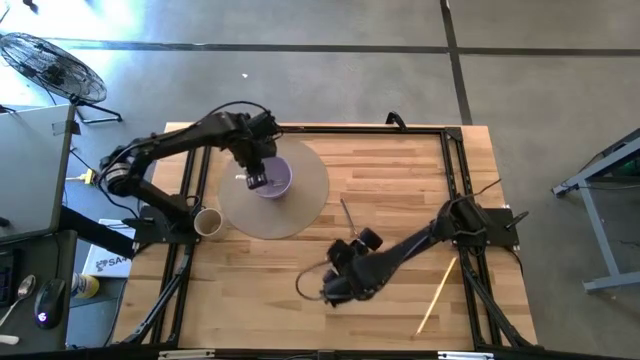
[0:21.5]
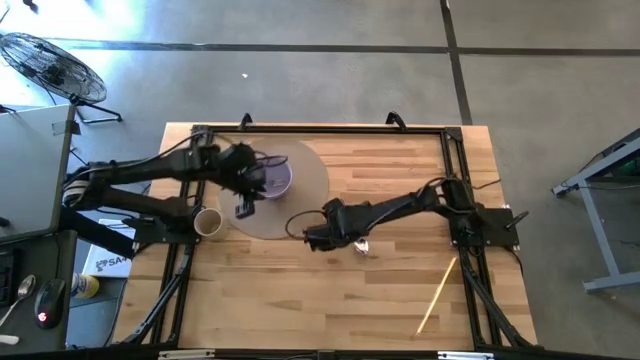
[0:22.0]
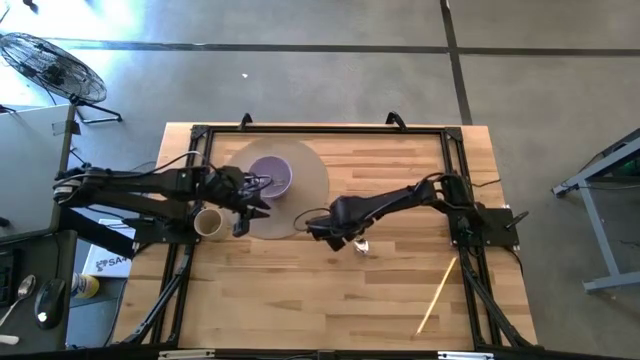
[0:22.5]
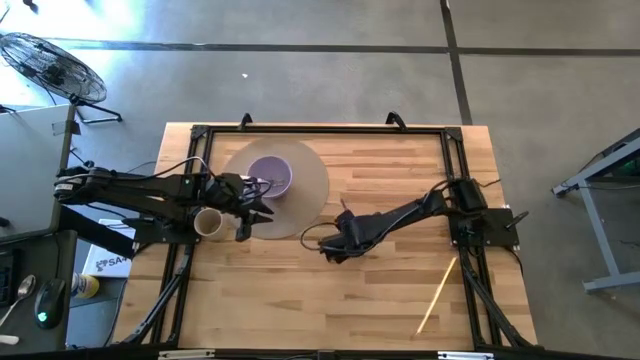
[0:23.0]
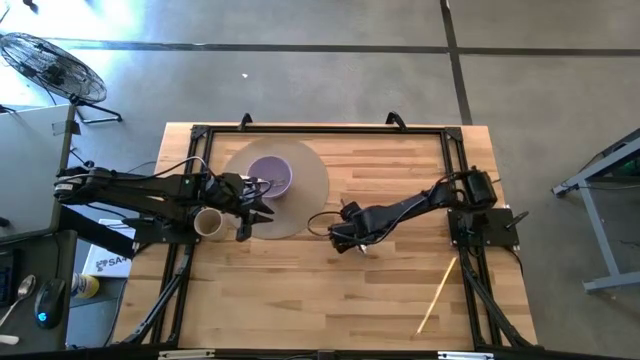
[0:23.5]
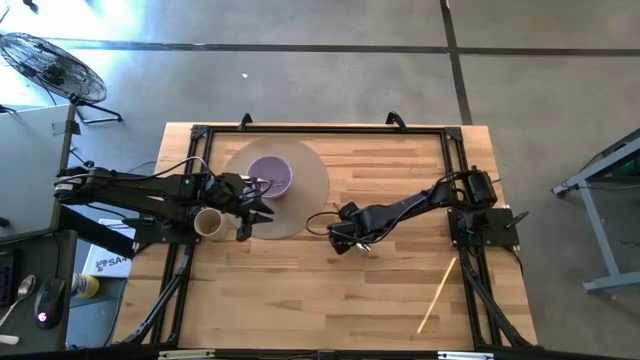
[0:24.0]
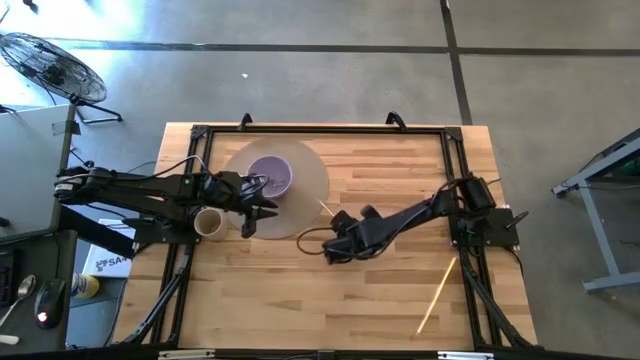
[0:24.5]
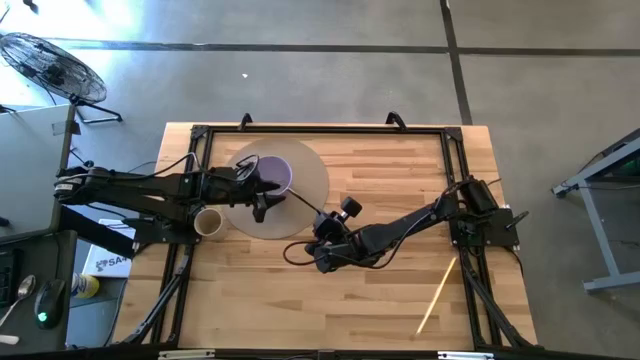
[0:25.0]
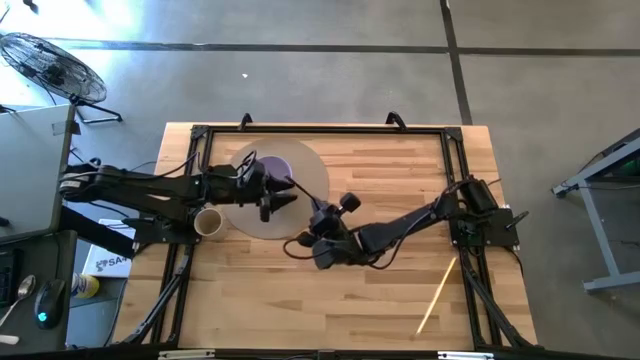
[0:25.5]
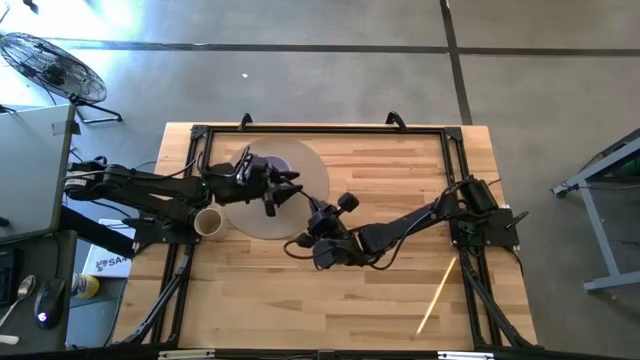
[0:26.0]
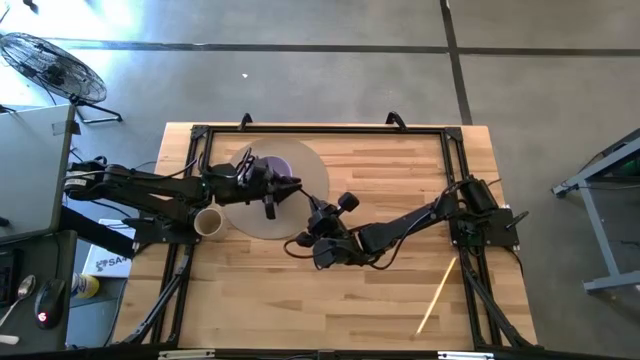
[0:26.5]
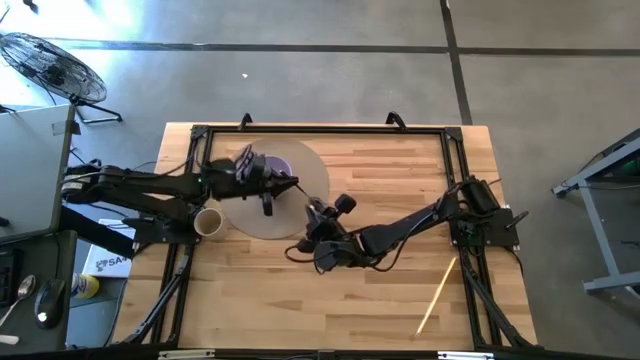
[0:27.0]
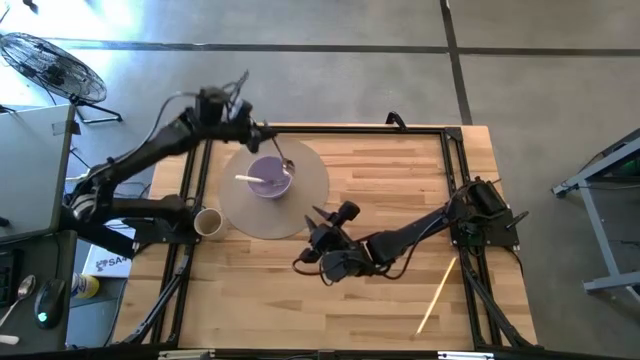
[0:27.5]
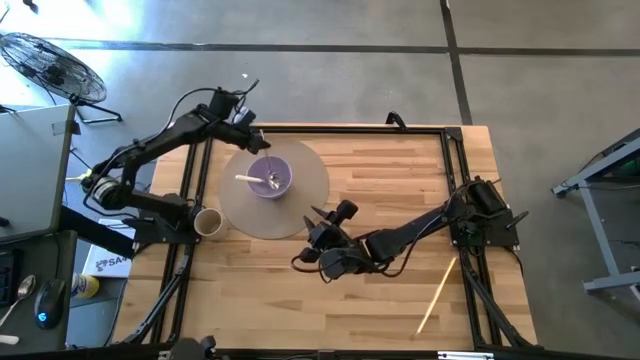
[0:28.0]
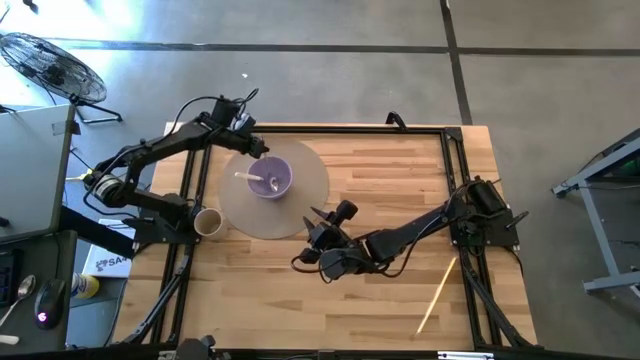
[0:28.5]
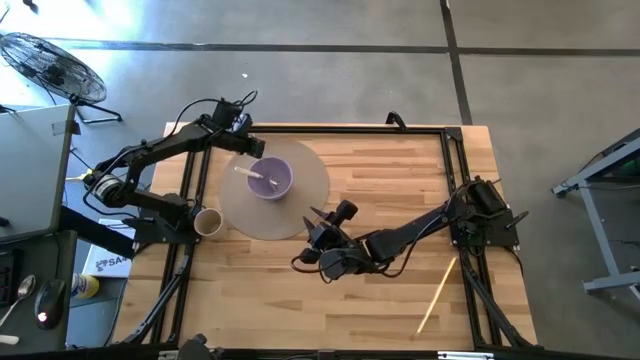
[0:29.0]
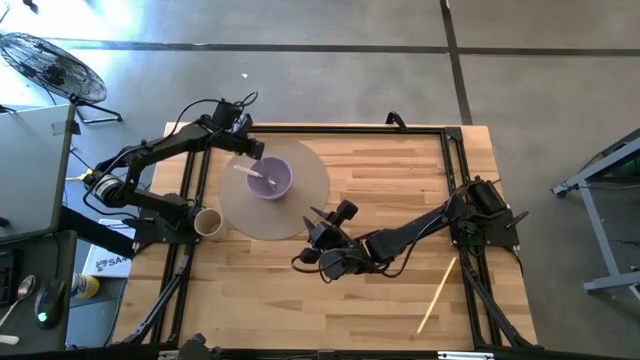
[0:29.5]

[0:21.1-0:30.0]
Task: Pick & Place Utensil
Put the silver spoon into the purple bowl on the gray placemat

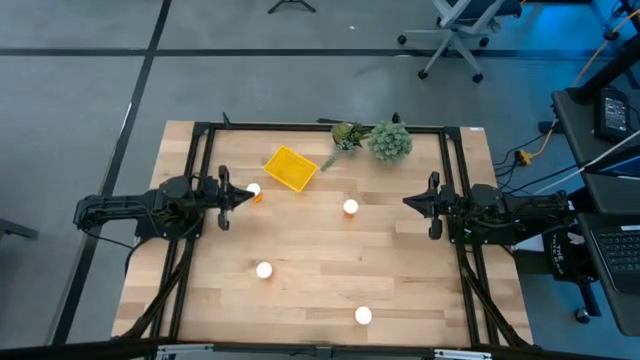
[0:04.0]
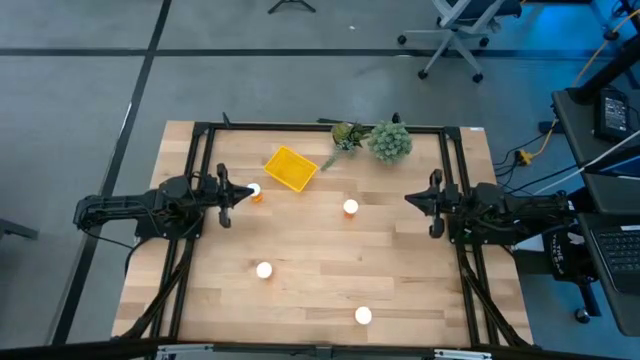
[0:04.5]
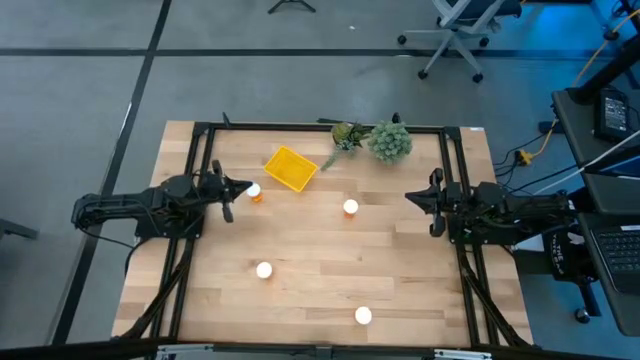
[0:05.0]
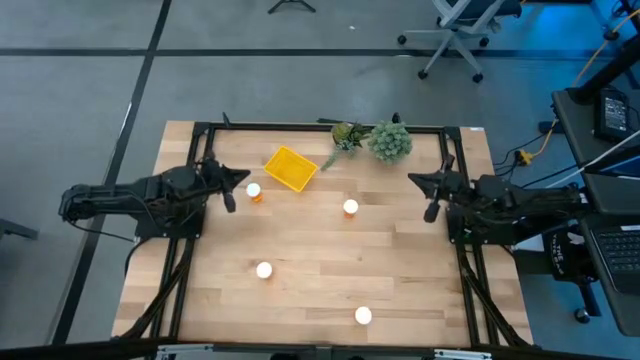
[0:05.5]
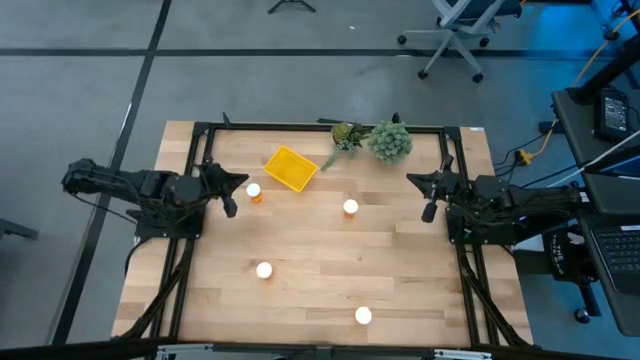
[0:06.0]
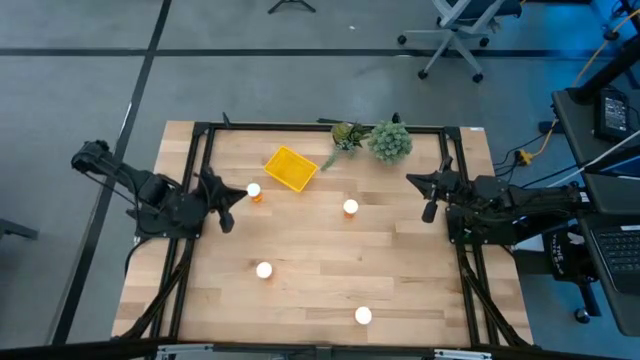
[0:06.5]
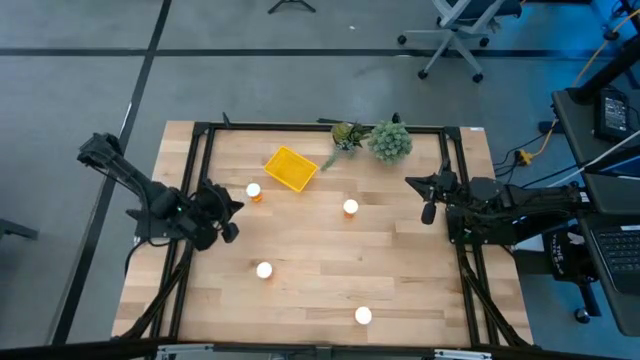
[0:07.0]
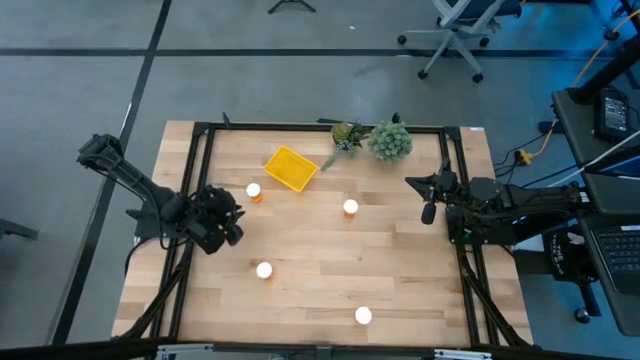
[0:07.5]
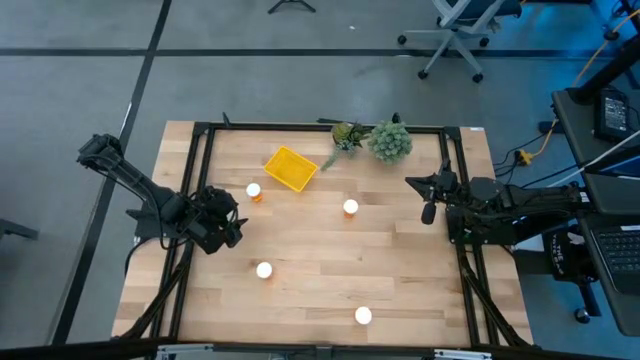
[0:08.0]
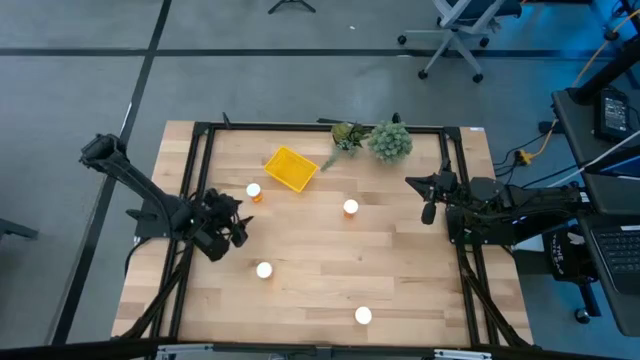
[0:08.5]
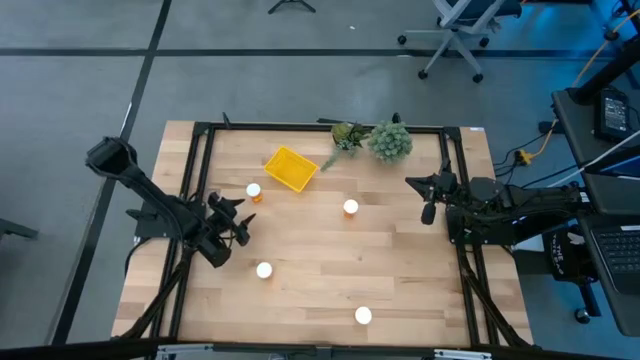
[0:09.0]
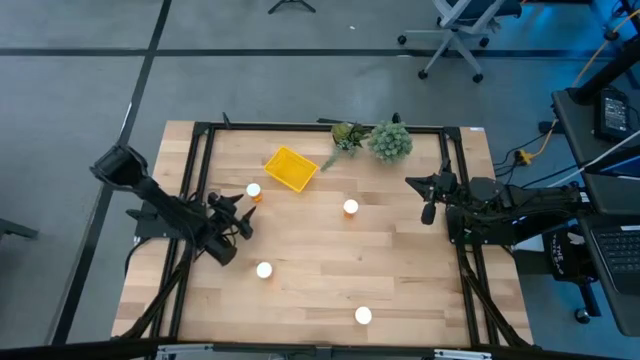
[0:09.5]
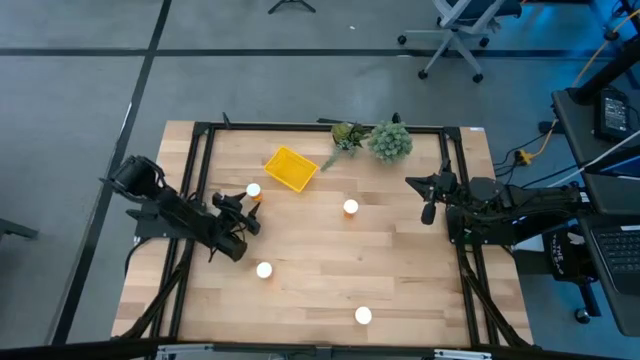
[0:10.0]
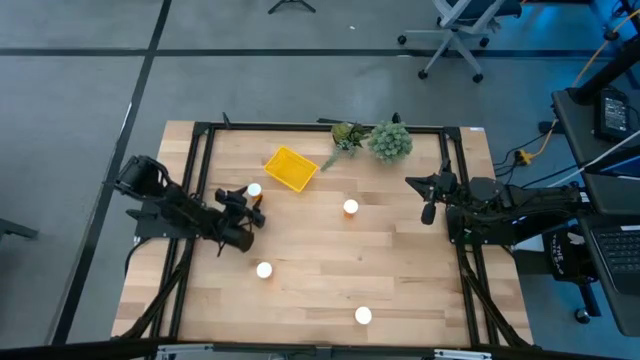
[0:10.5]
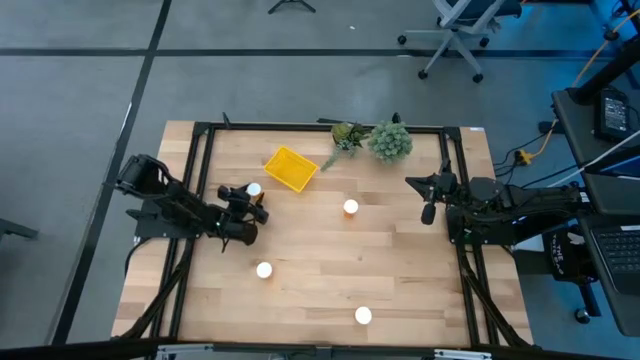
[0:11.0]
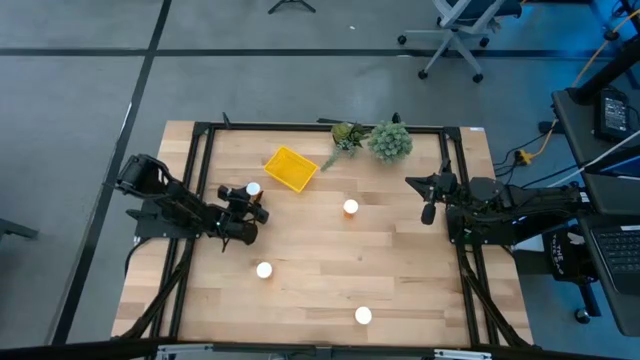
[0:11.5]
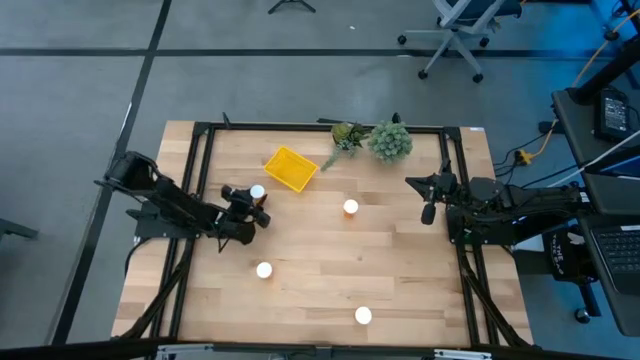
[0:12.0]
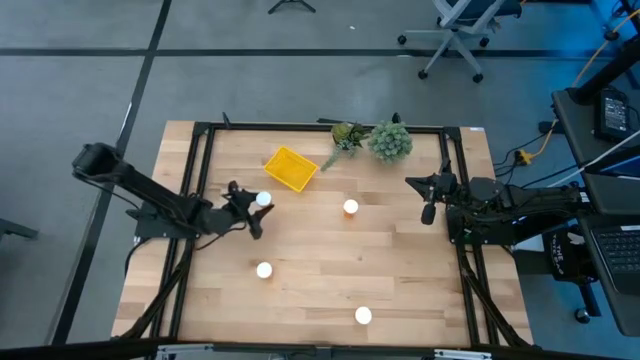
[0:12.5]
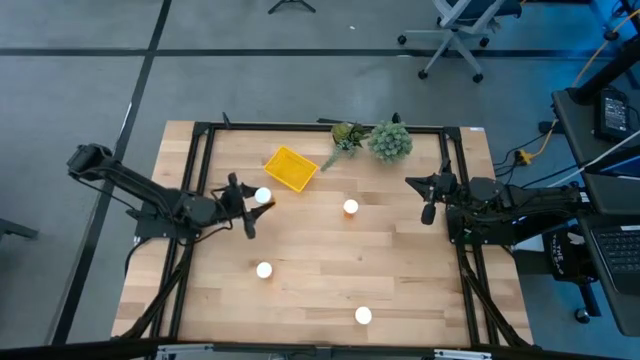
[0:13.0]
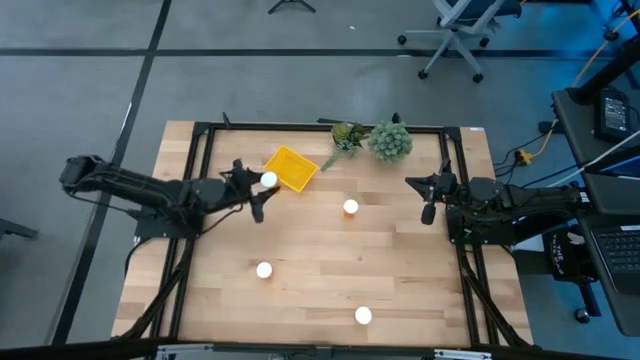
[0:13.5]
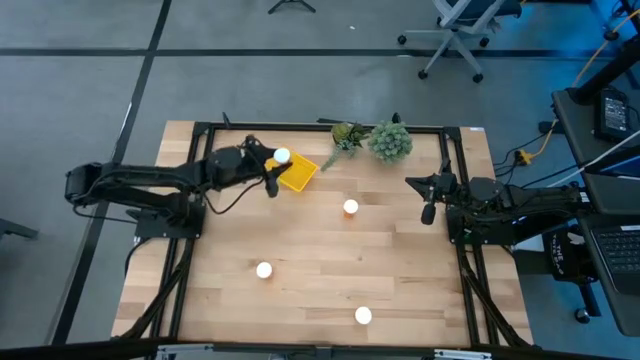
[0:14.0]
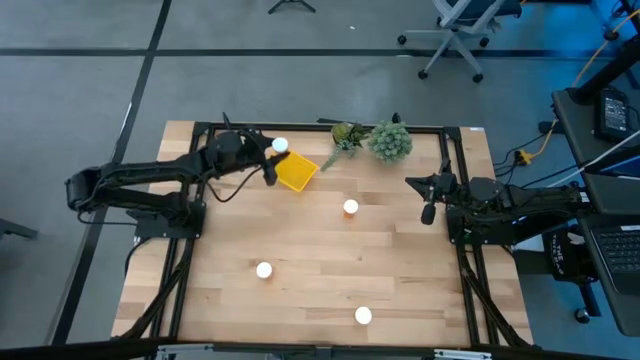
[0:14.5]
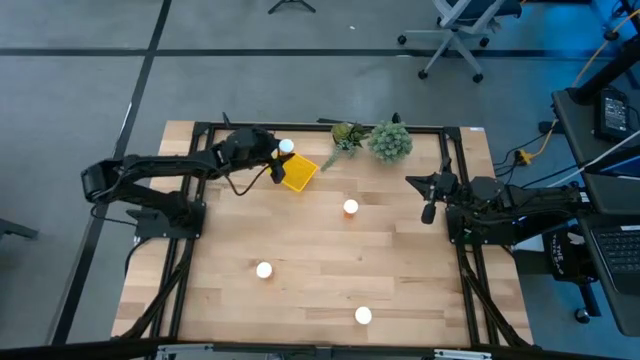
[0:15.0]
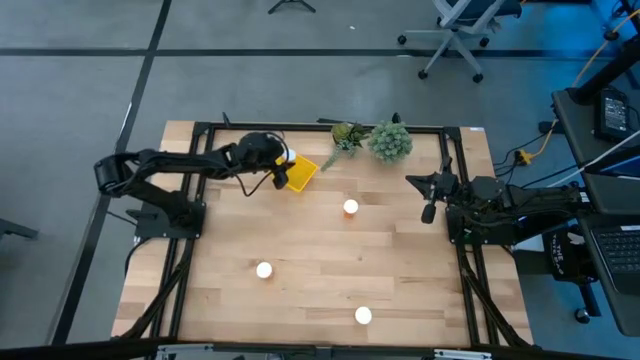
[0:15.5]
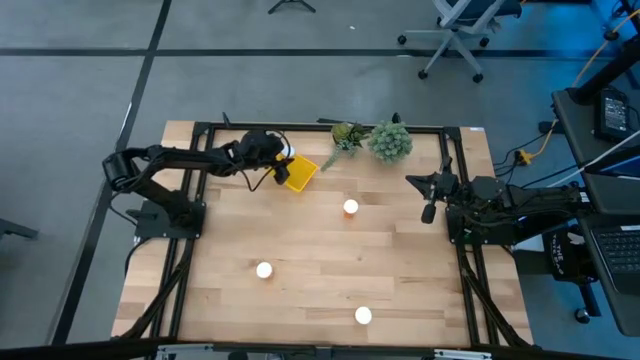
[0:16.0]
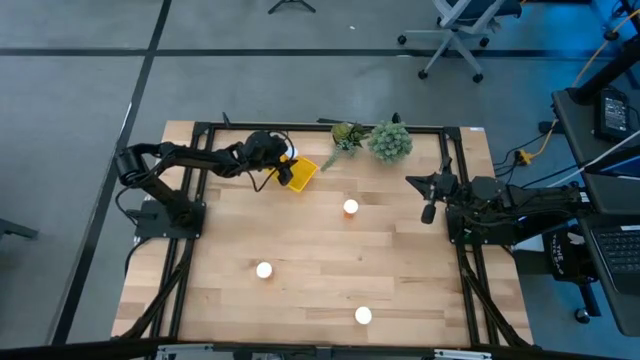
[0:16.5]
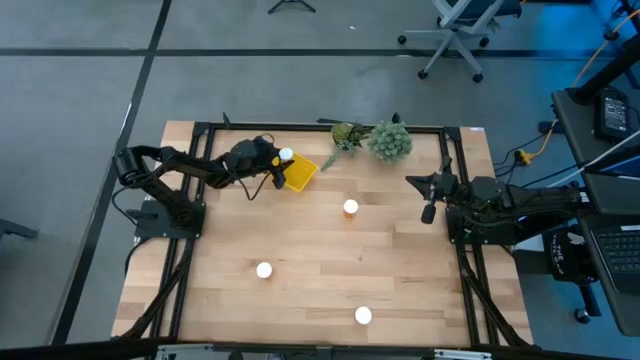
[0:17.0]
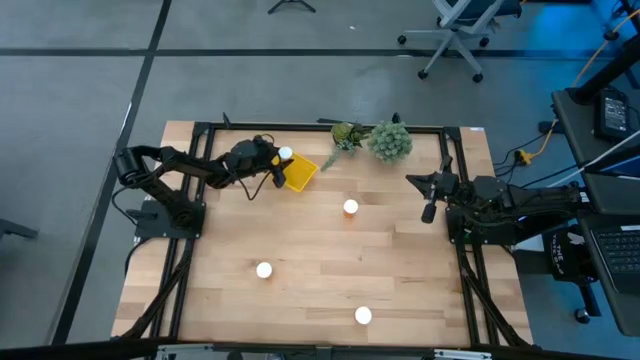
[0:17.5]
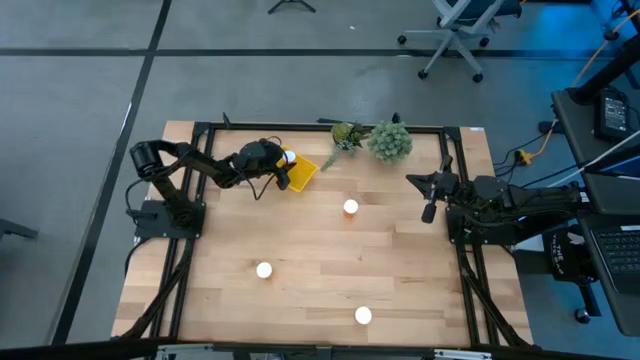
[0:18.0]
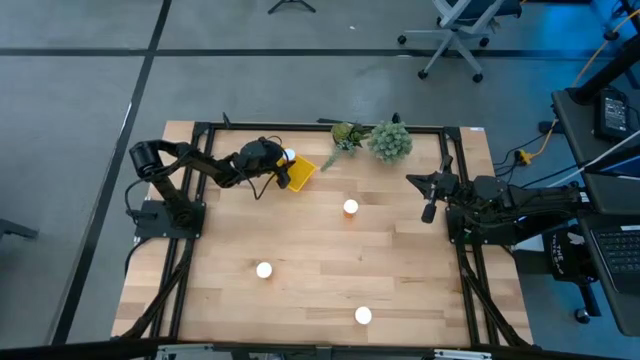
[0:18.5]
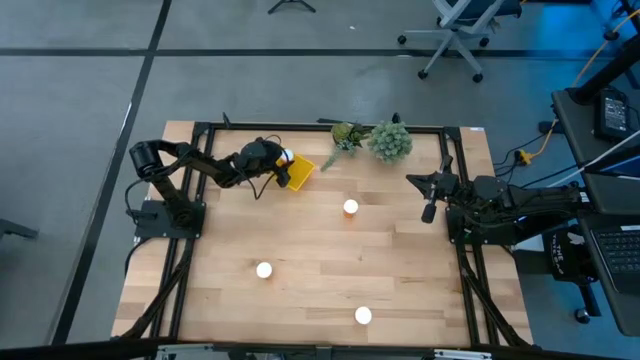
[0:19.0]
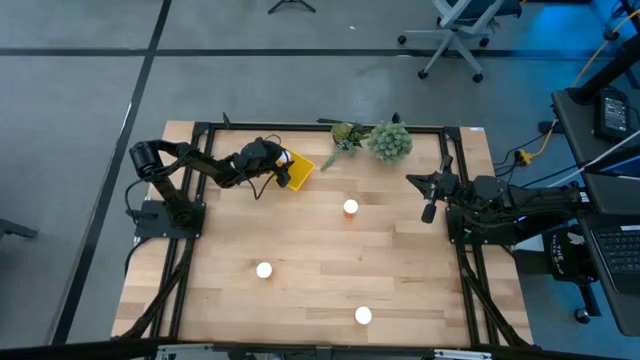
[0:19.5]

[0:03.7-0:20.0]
Task: Pick and place pill bottles into a basket
Put the orange pill bottle into the yellow bin
